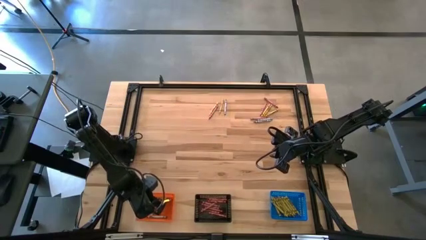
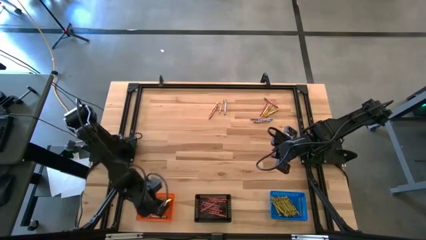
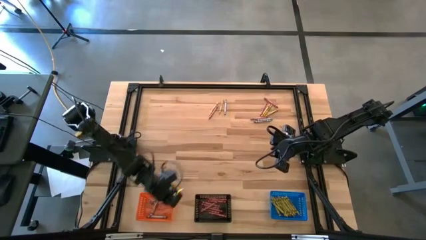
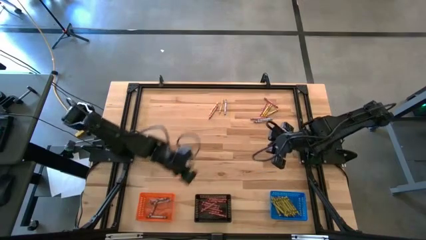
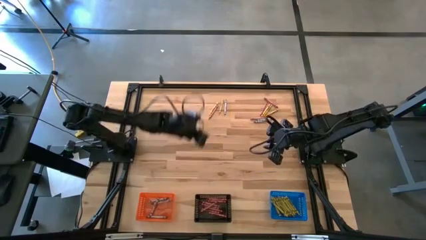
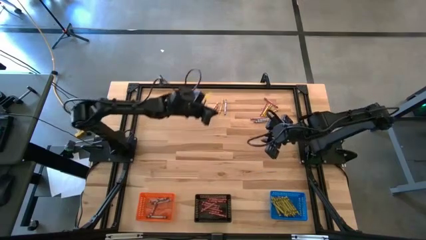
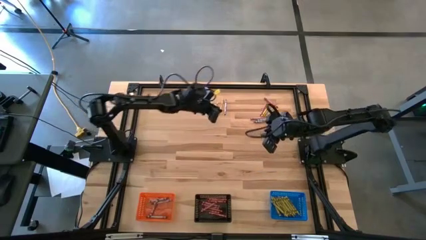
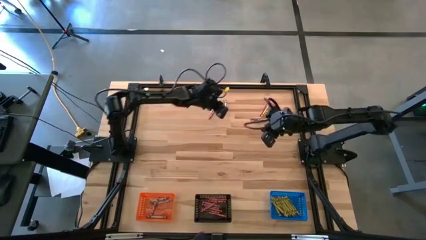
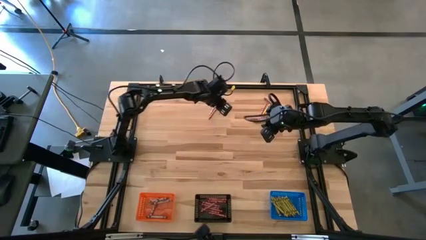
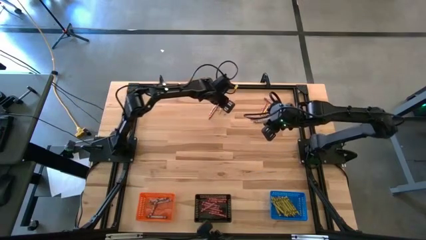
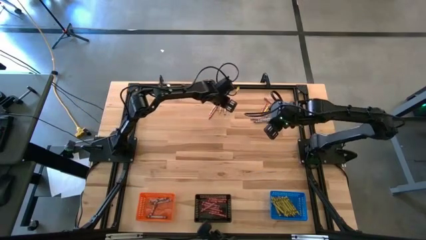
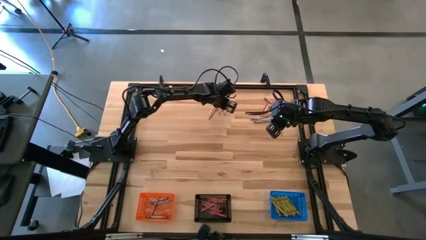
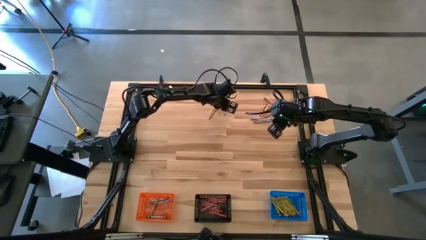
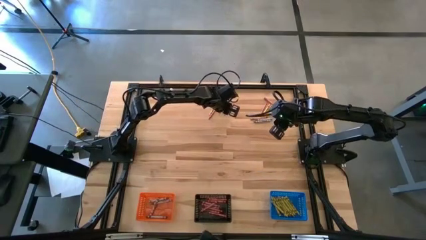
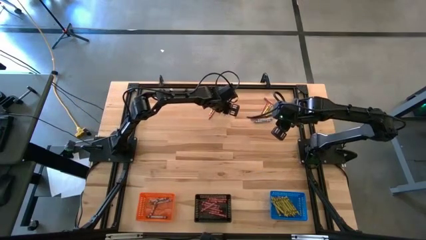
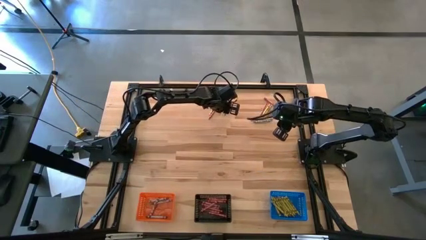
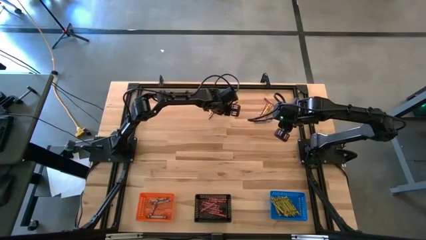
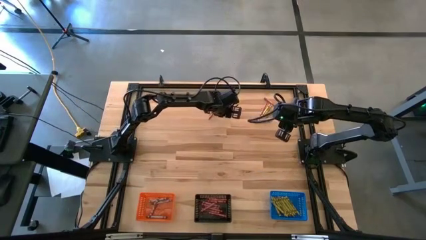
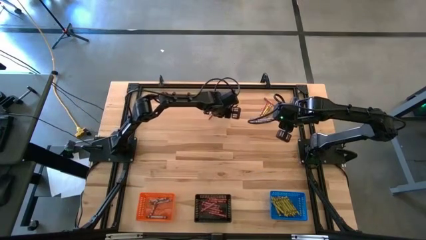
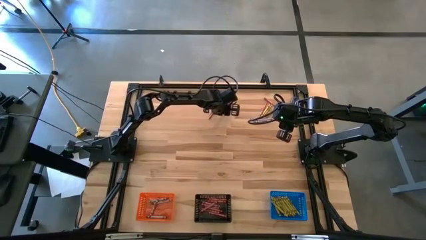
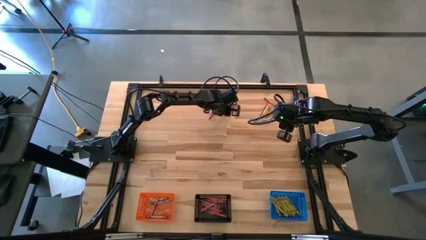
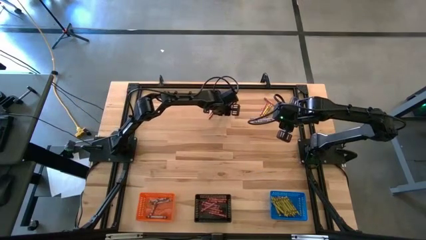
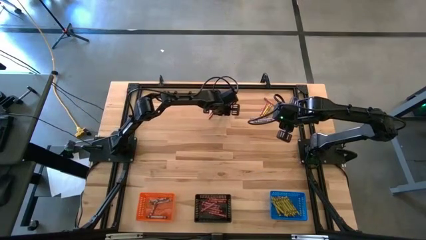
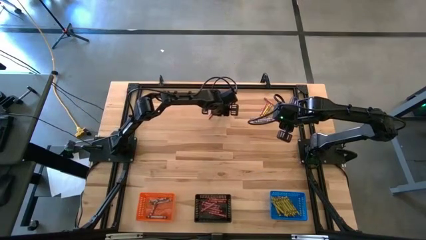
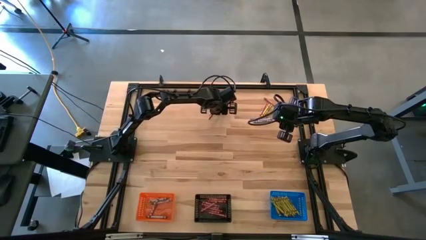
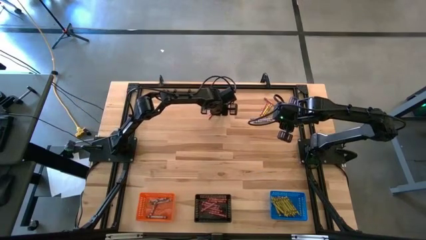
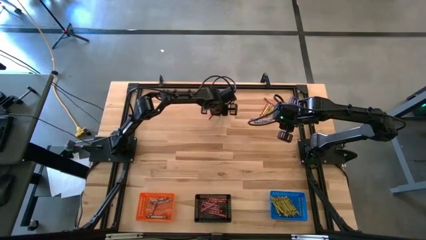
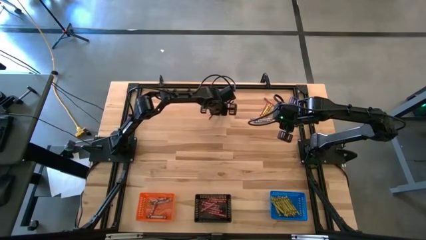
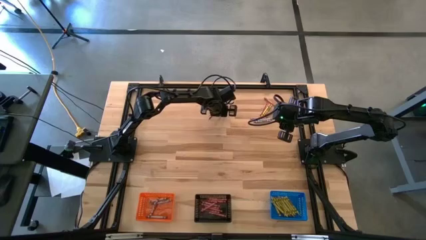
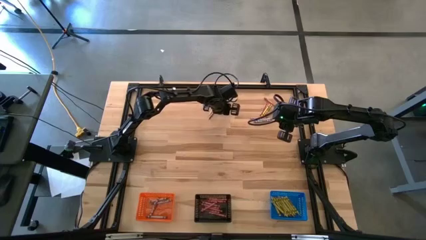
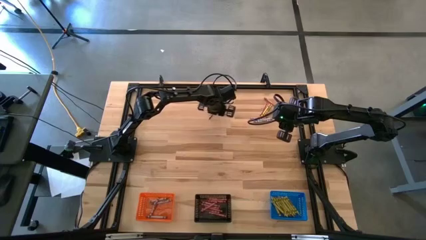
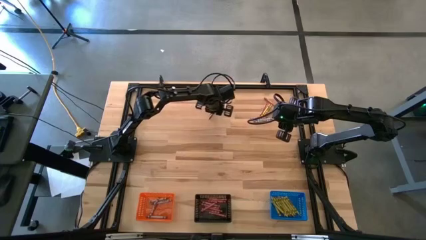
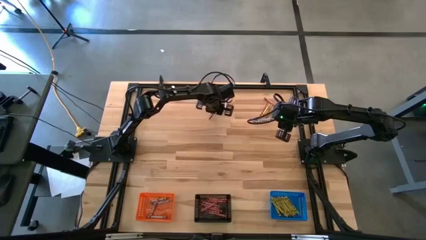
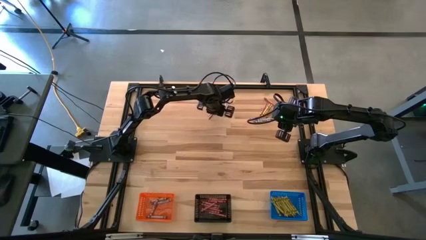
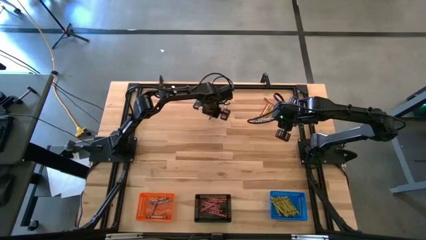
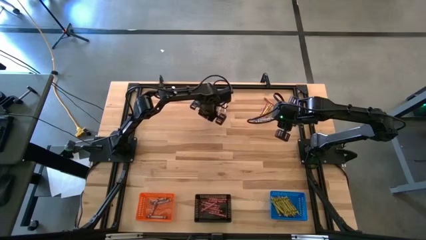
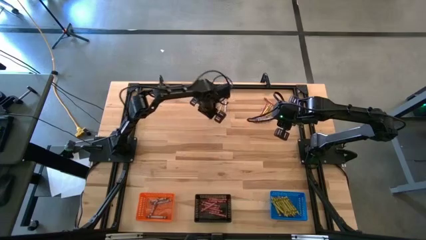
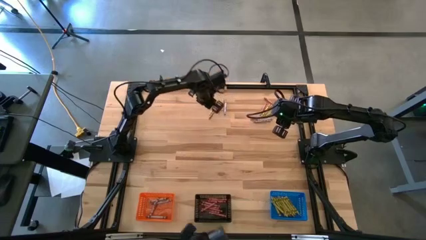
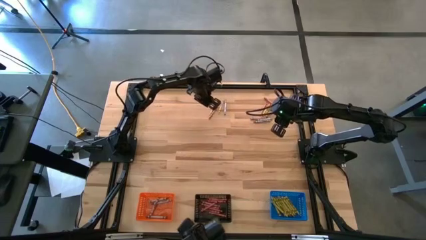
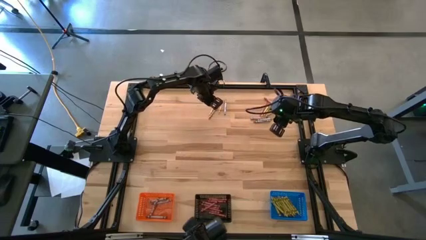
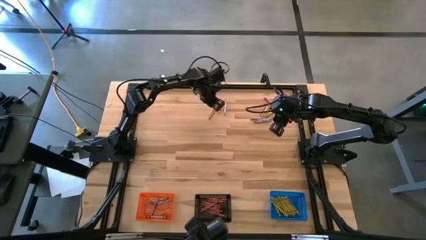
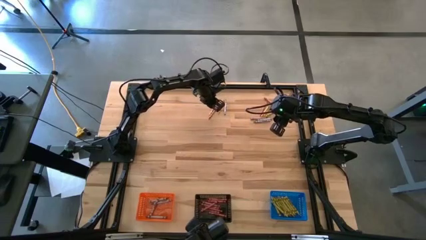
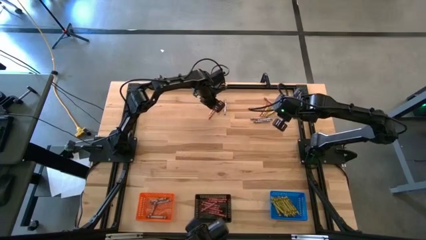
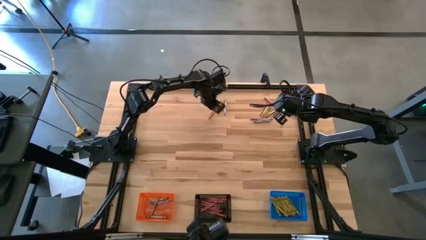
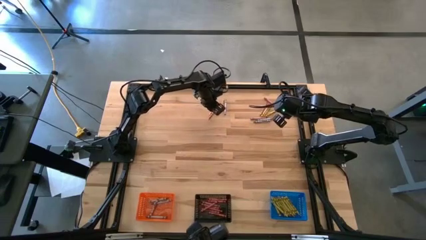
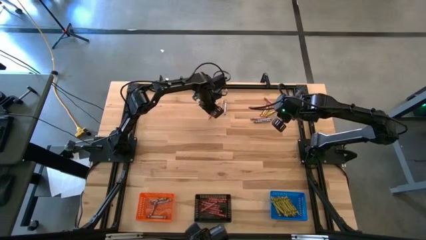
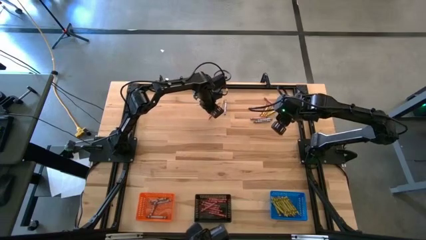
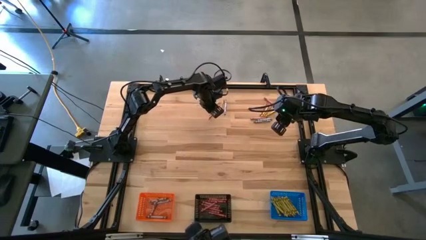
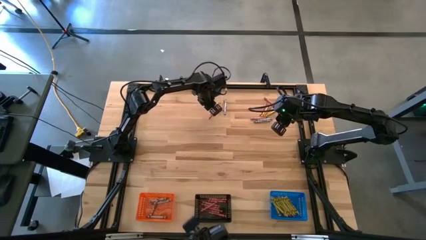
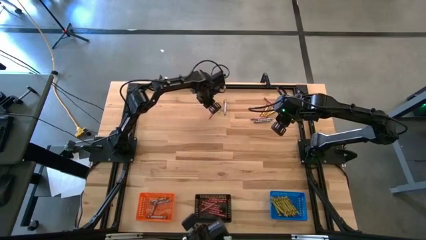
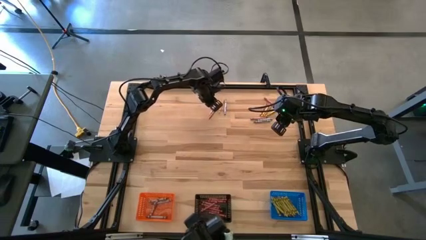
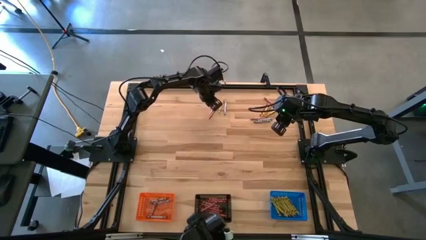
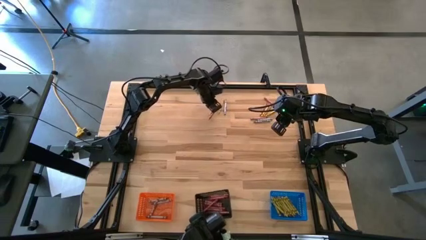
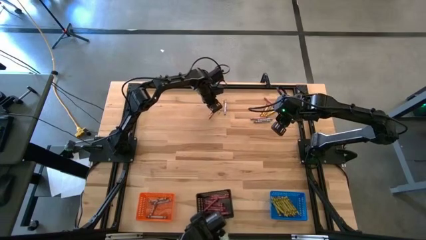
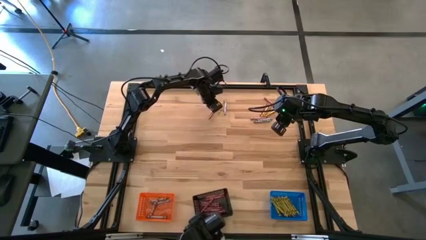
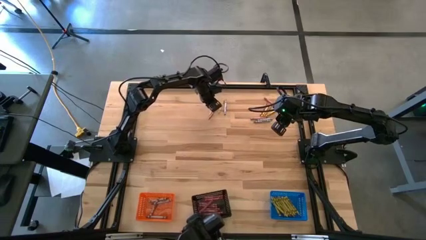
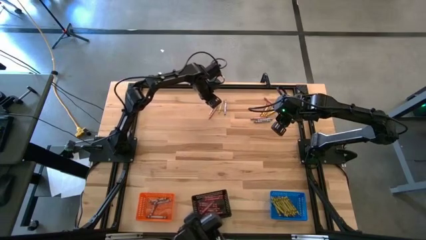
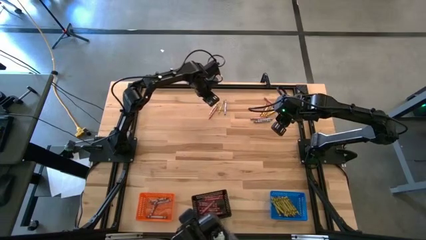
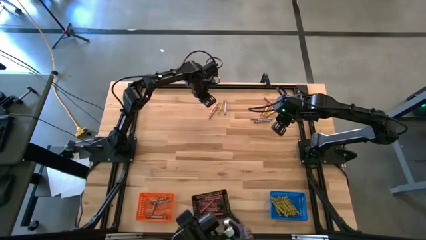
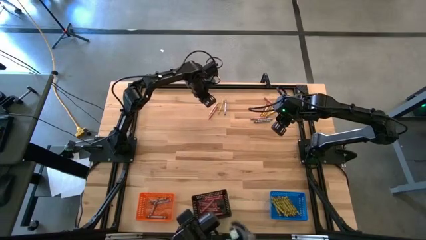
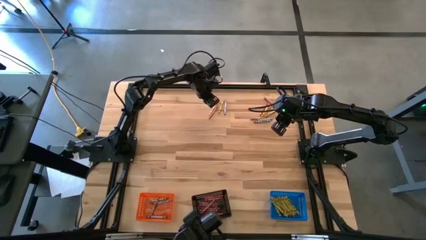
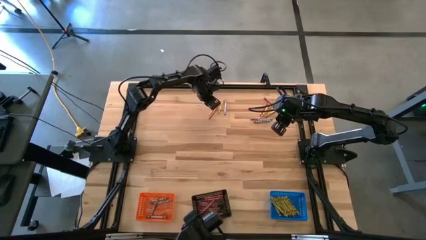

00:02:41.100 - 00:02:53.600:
Task: Sort crayons
Put the gray crayon into the orange bin

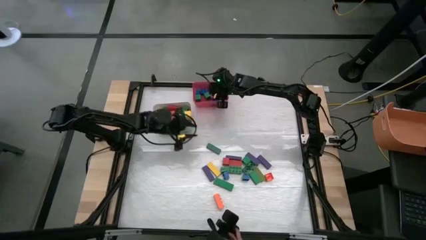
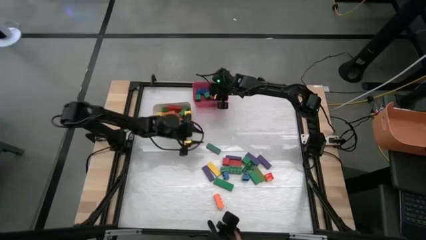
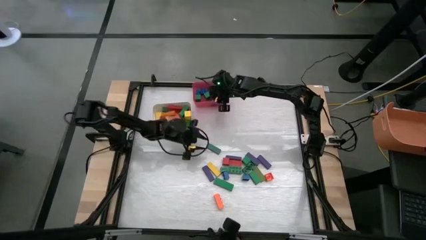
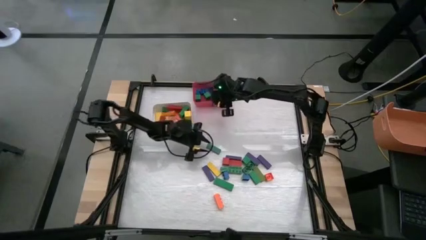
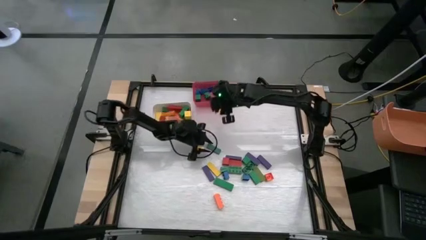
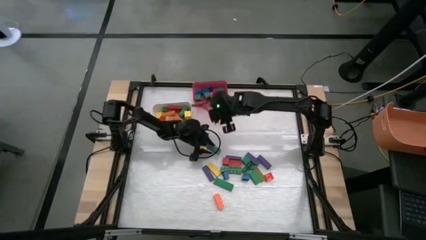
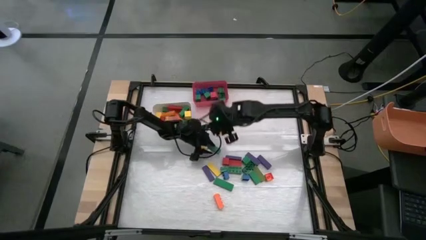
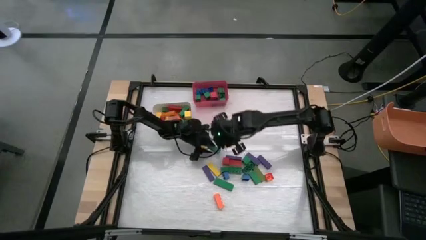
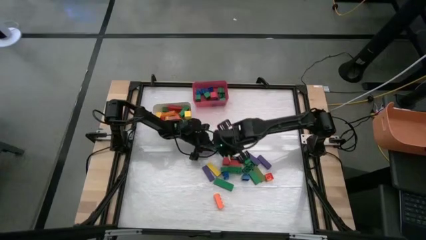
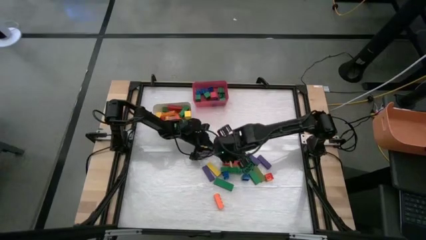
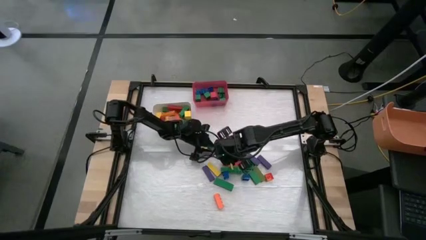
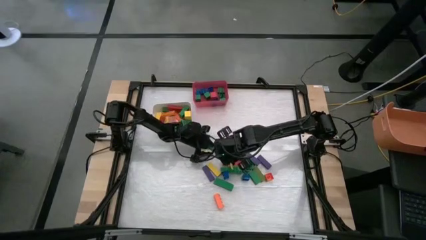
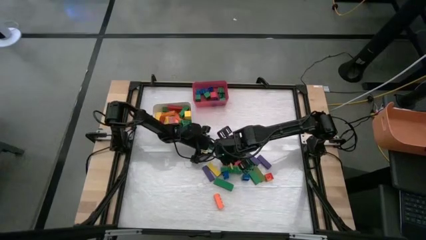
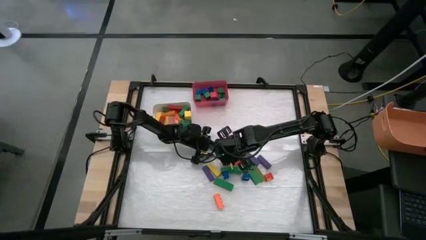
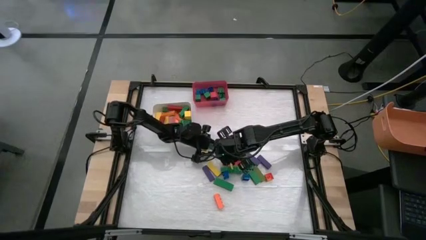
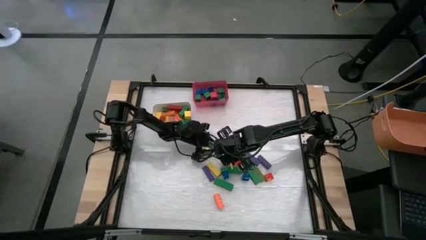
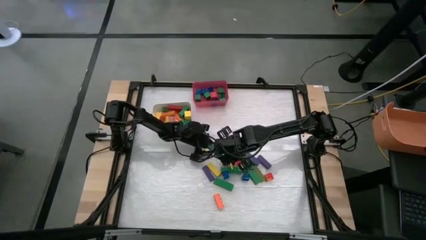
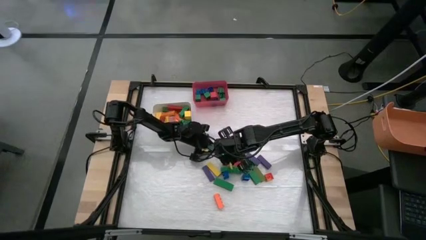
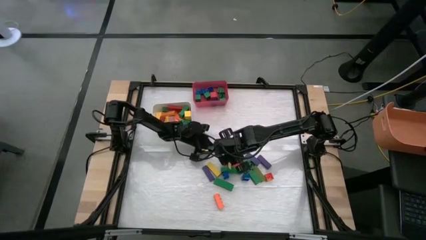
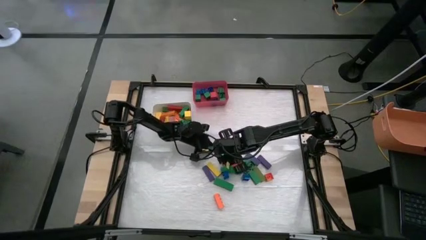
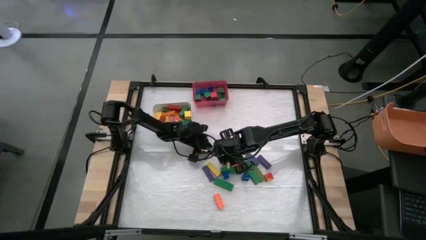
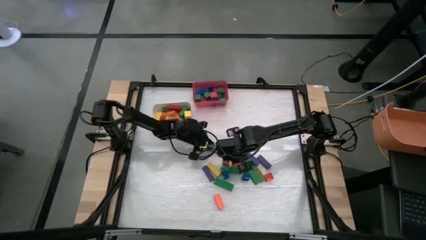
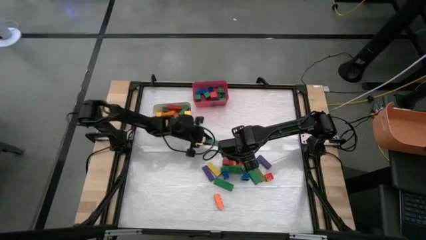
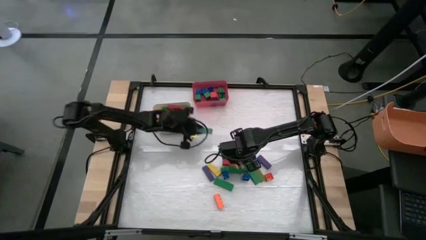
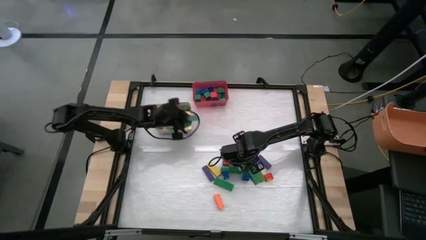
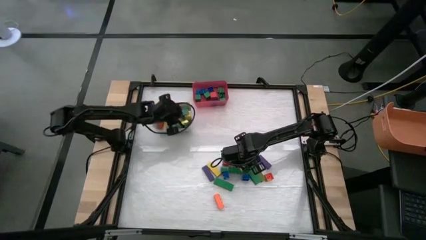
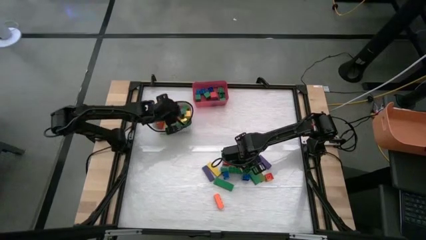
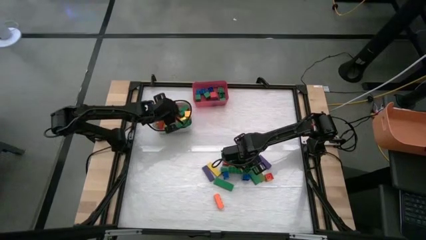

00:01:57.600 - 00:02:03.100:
Task: Sort blocks by size
Put the large green wooden block into the white bin
